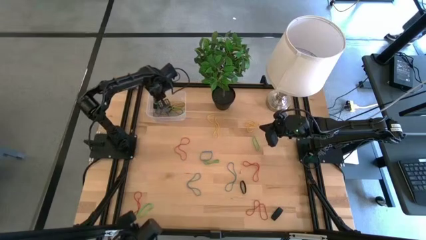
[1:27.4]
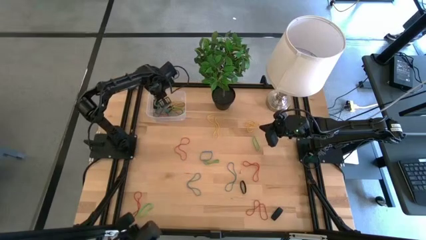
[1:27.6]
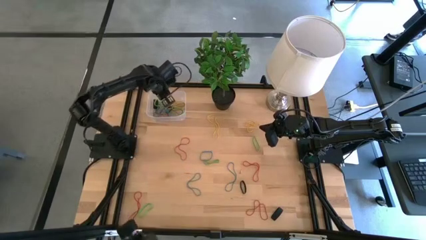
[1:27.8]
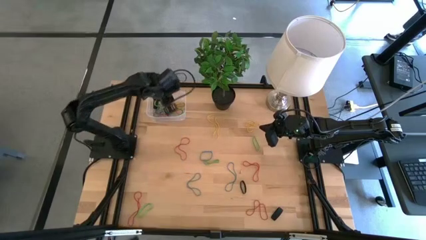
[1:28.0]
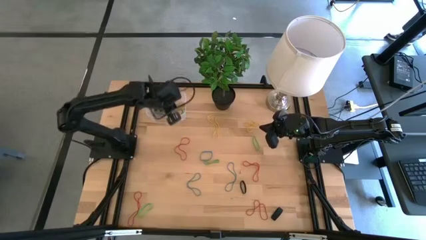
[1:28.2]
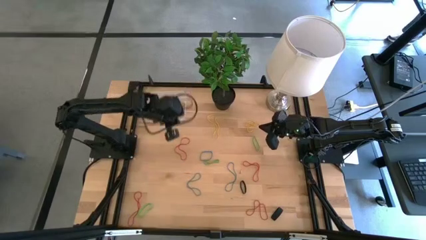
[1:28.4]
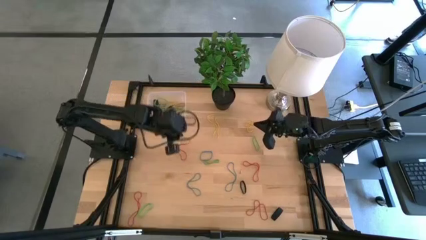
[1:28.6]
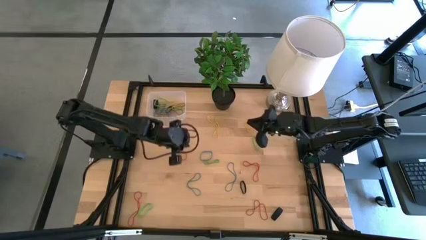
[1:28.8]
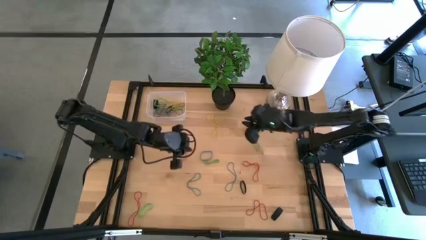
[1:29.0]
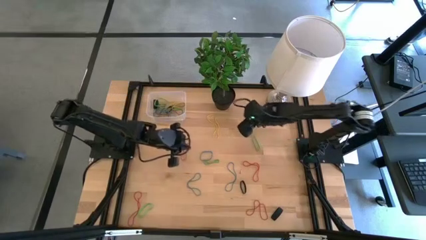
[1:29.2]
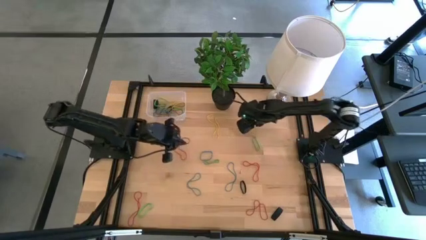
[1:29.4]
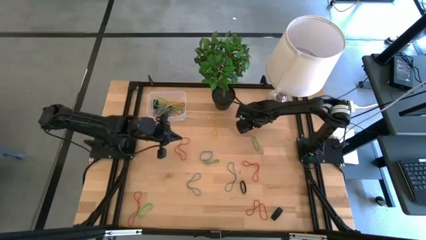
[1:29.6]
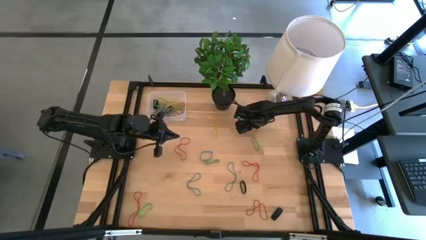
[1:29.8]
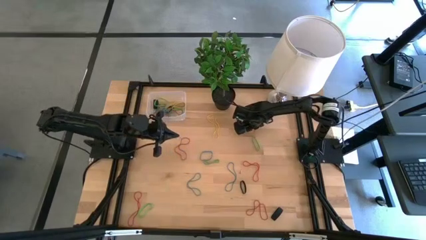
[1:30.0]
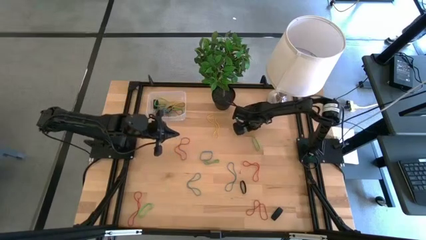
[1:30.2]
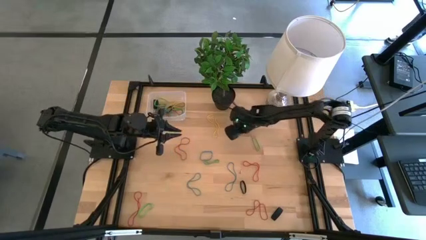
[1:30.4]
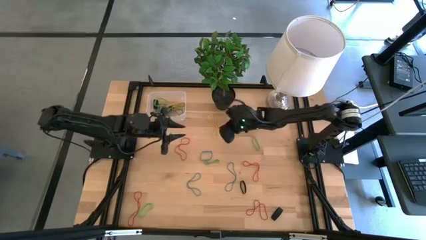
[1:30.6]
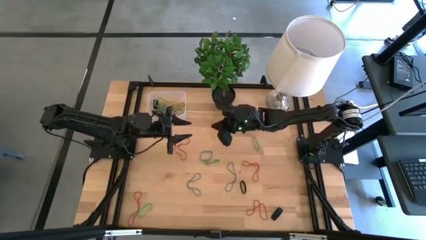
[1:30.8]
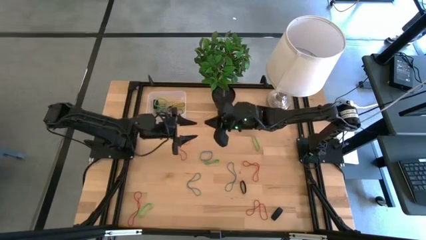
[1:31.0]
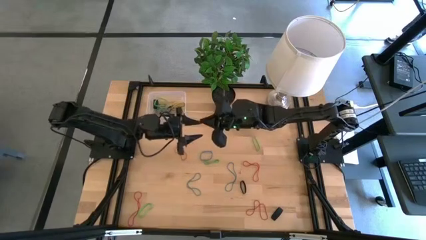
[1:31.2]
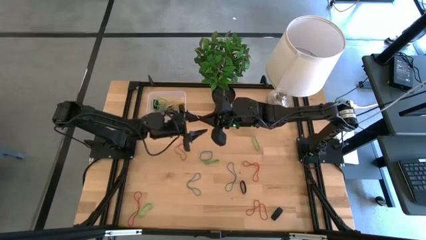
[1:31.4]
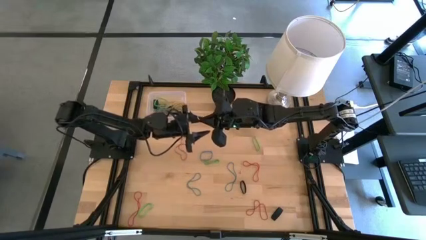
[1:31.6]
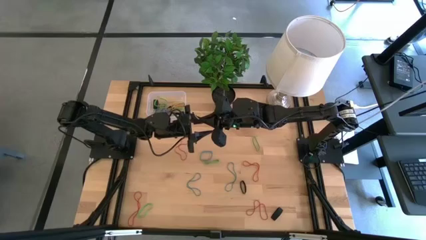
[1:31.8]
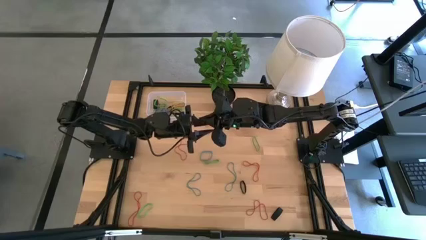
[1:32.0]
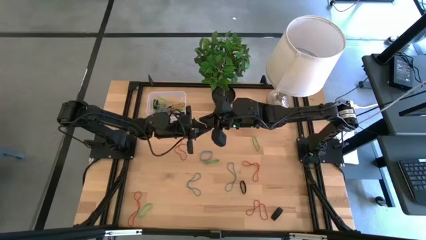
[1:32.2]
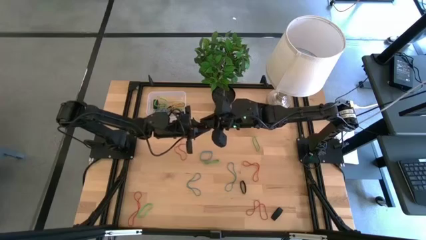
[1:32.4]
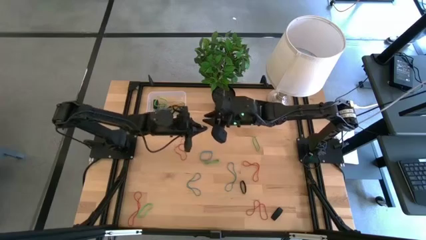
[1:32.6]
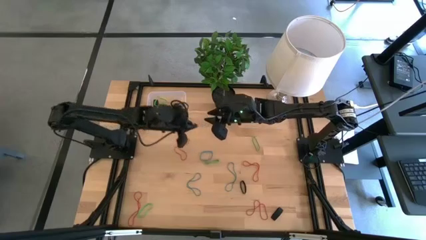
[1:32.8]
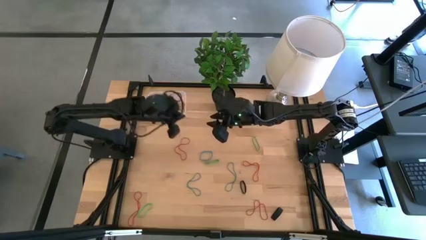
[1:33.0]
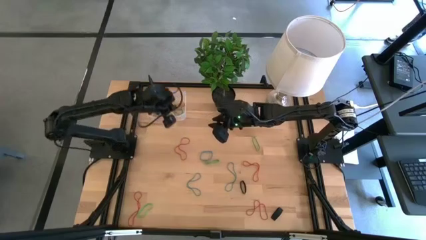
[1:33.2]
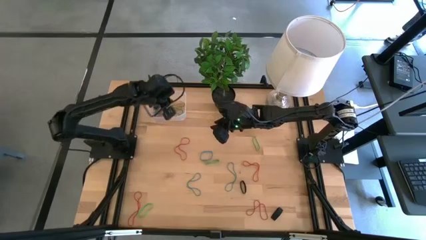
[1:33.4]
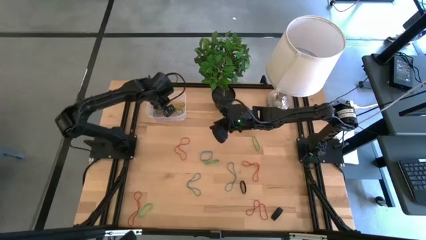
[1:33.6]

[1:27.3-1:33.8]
Task: Pick and place rubber bands into bin
Put the yellow rubber band into the basket

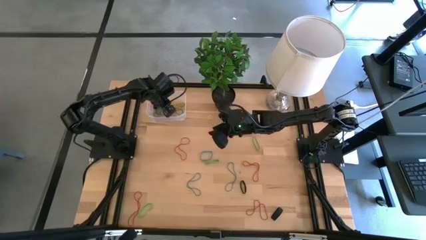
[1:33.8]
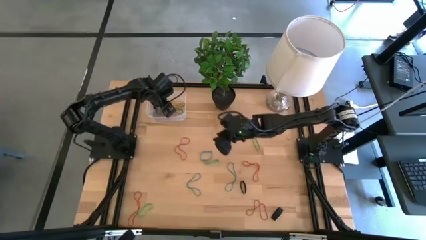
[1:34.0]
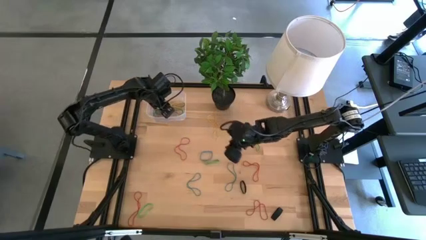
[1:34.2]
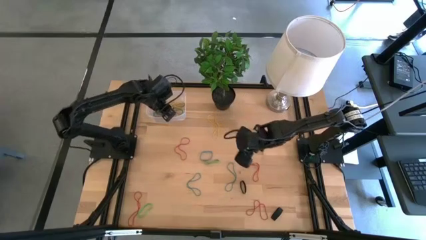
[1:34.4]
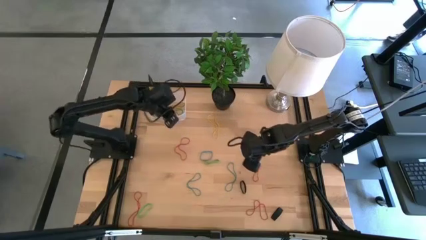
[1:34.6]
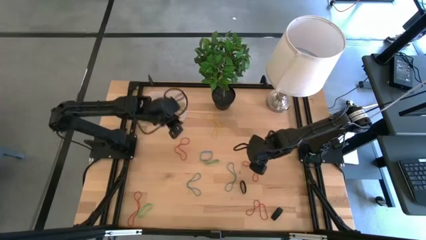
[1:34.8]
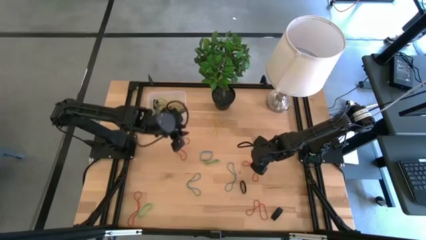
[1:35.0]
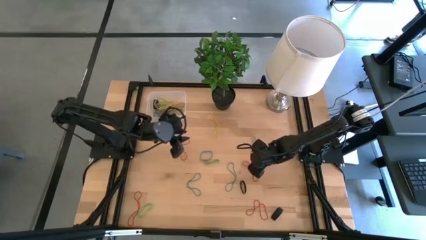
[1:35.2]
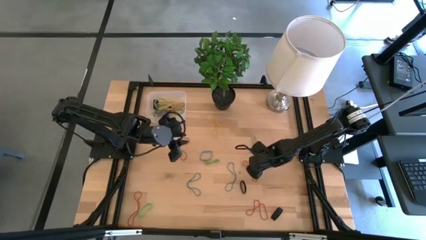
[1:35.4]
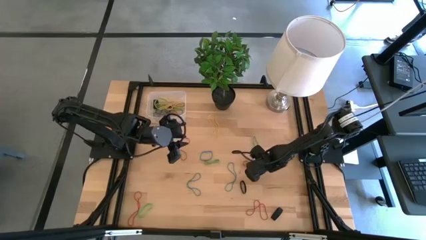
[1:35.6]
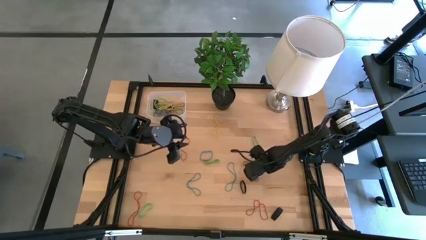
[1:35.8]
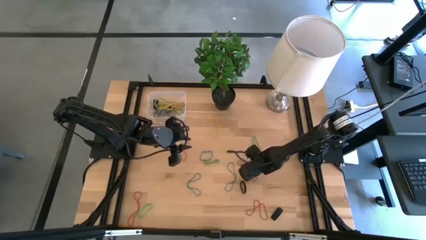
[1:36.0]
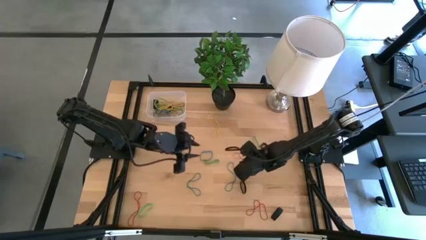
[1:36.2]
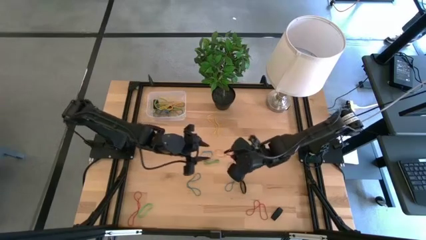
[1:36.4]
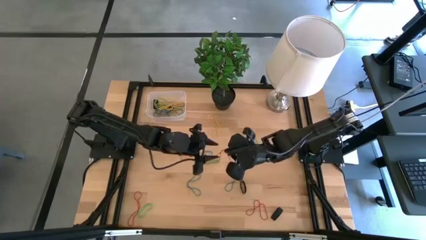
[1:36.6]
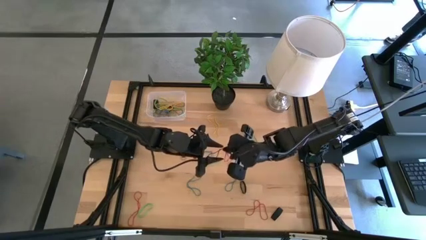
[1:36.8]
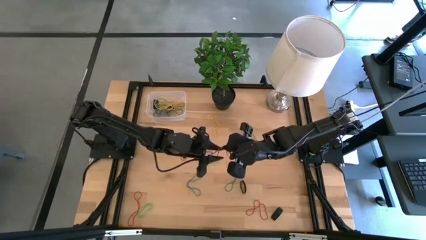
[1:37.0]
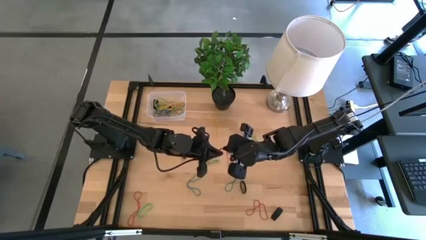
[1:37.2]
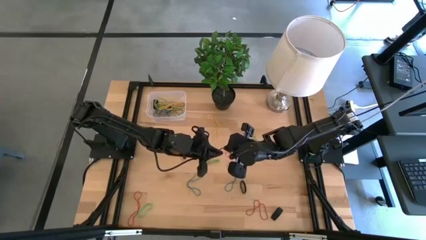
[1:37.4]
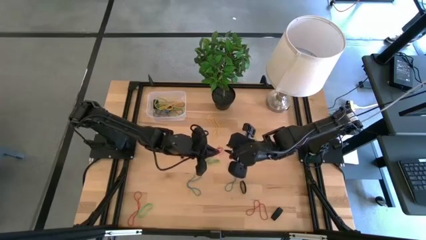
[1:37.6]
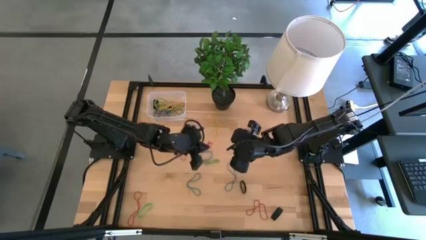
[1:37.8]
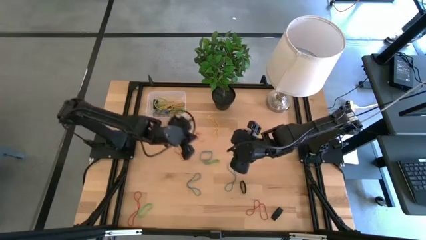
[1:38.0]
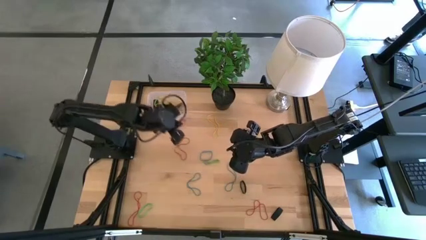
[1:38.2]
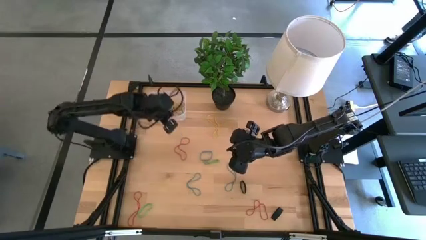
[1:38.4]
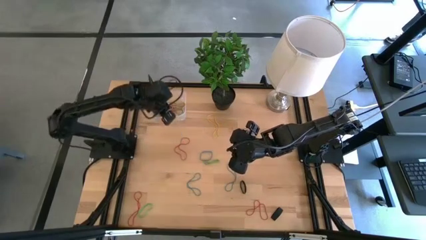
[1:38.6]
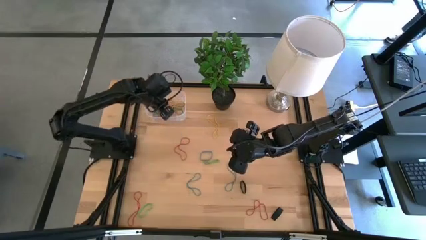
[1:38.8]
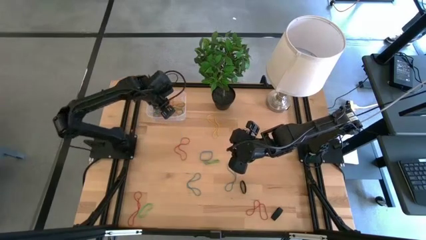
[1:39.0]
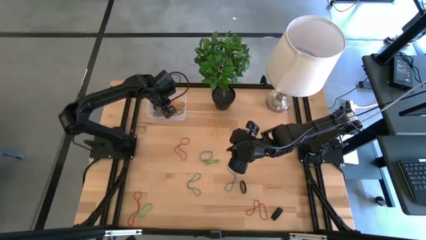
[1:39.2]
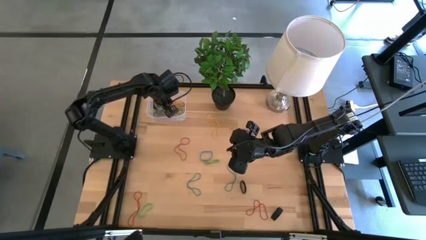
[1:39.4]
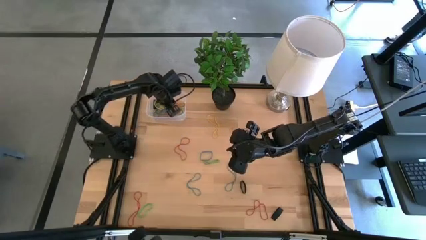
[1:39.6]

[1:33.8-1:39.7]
Put the red rubber band into the transparent bin

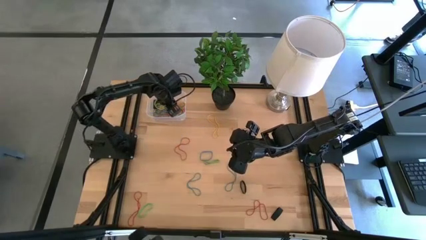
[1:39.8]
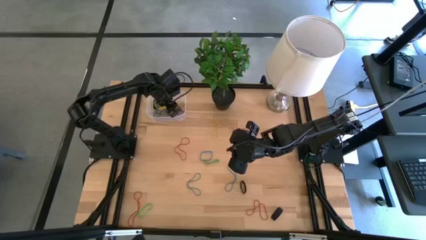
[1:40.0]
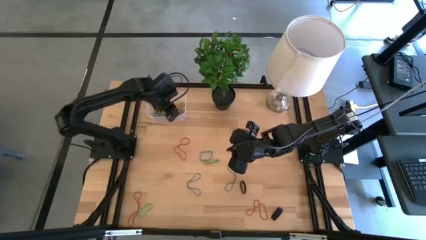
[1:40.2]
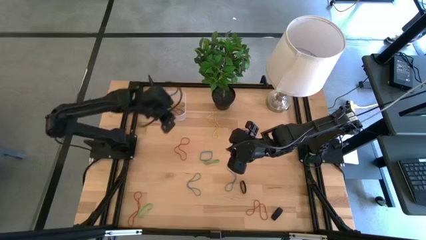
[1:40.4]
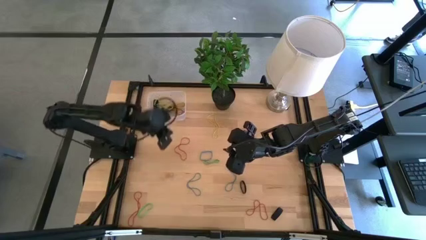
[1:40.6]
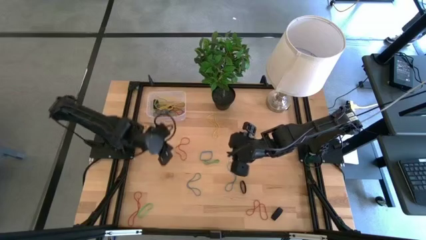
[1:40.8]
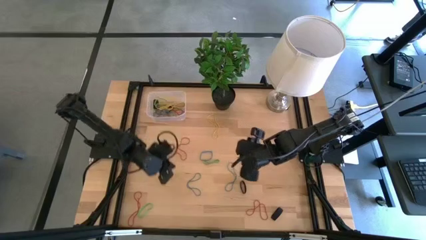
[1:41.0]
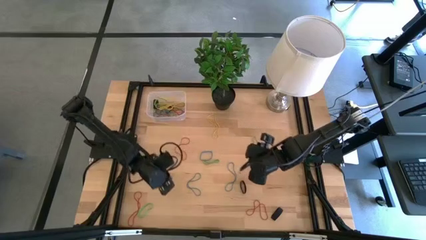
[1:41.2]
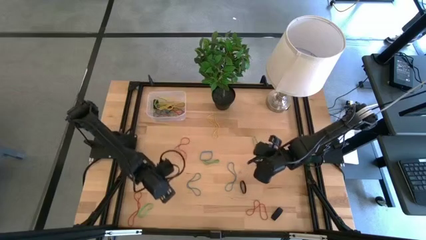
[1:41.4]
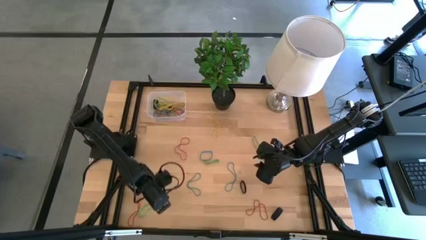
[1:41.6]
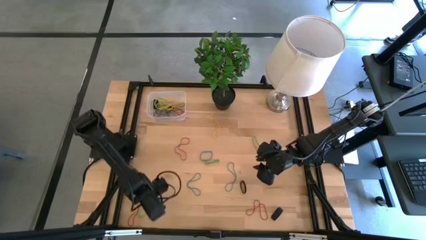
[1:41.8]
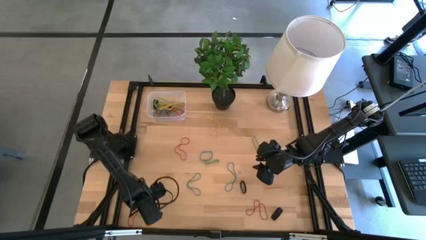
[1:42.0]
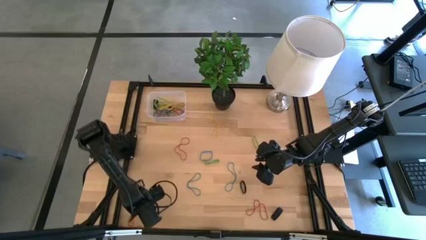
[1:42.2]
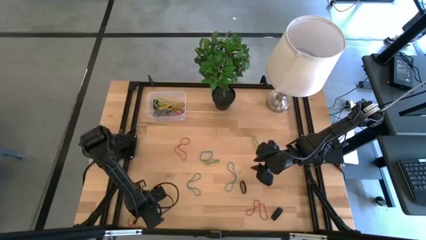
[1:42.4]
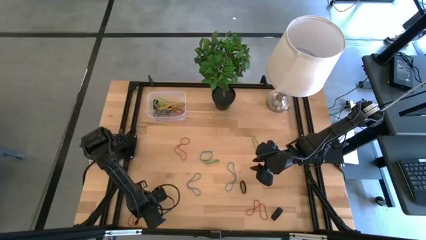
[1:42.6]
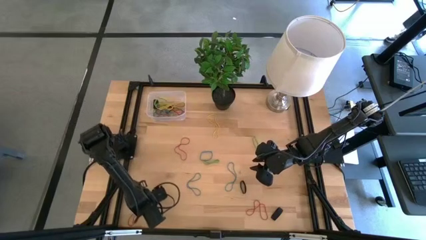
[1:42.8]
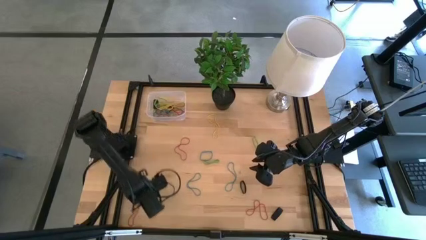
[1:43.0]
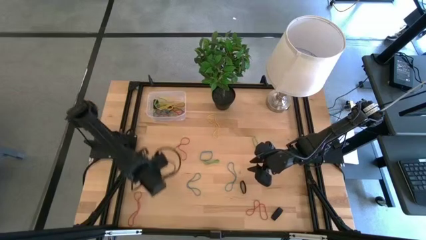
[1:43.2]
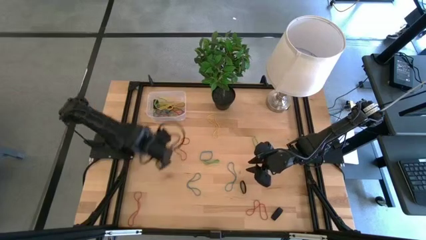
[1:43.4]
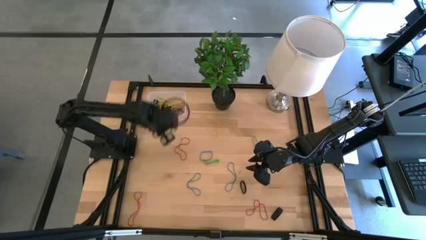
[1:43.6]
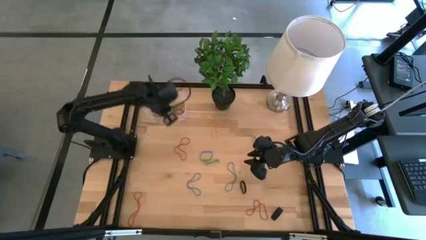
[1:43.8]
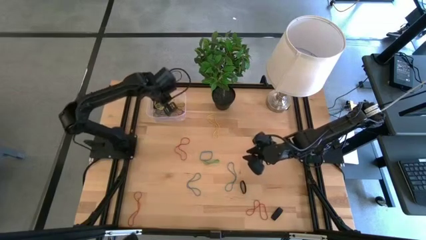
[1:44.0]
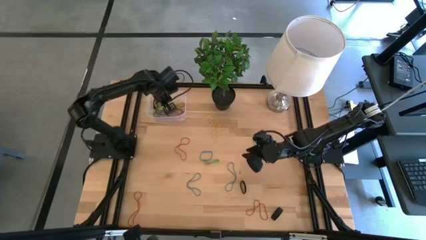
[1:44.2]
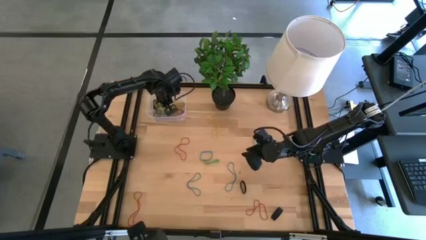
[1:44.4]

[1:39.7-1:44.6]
Put the green rubber band into the transparent bin
